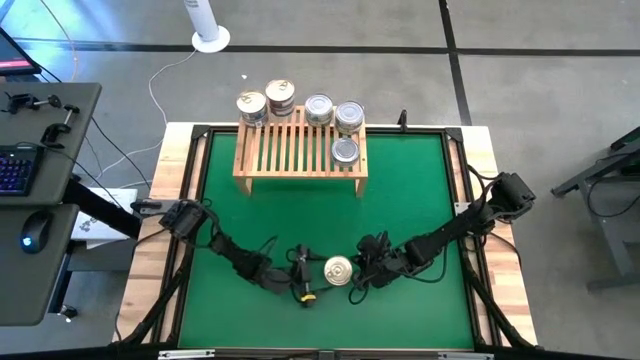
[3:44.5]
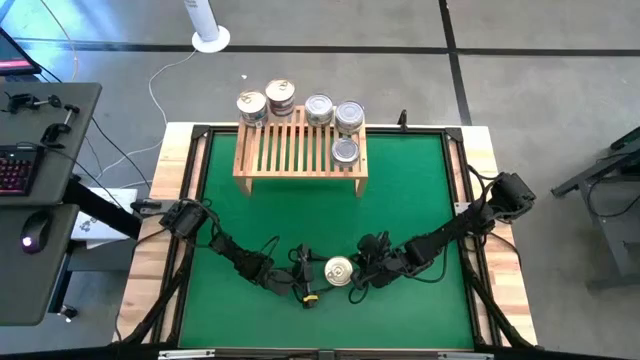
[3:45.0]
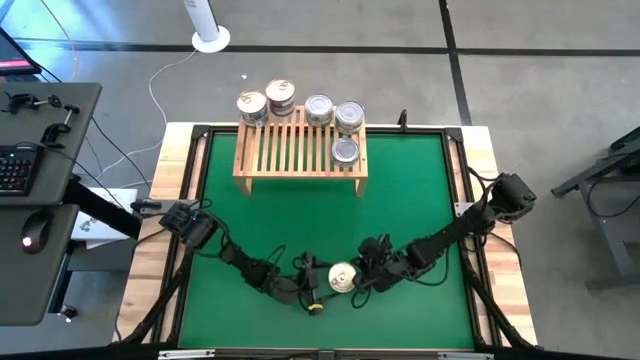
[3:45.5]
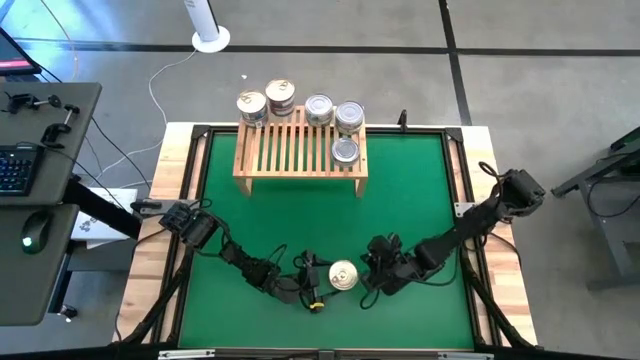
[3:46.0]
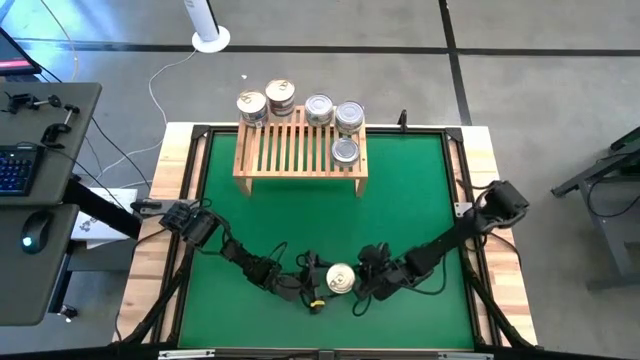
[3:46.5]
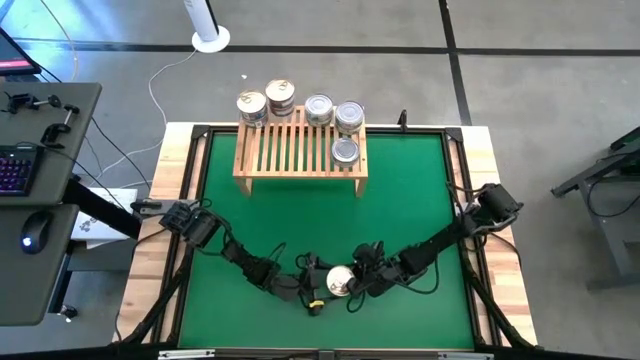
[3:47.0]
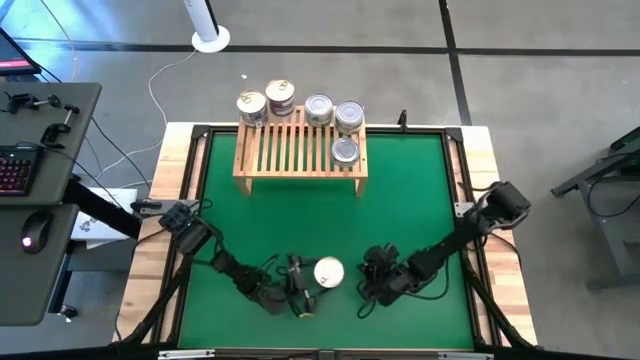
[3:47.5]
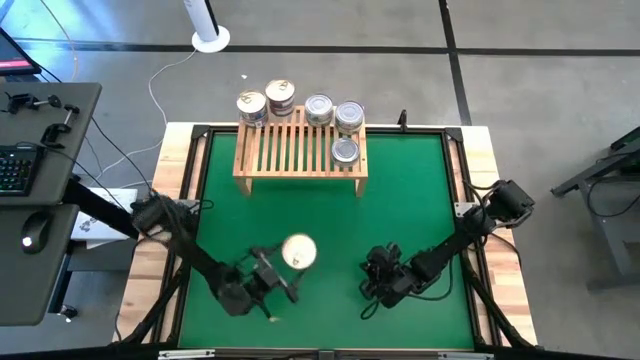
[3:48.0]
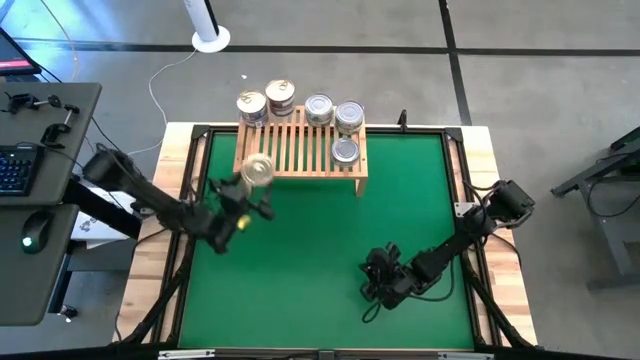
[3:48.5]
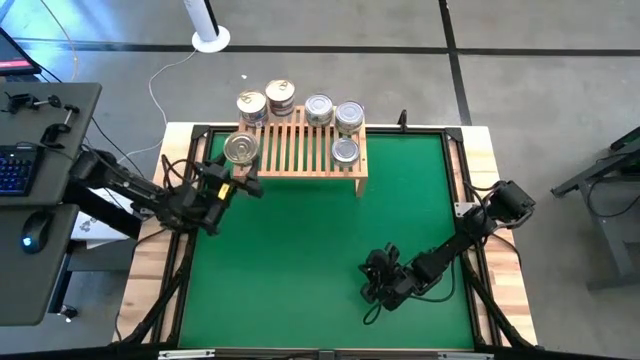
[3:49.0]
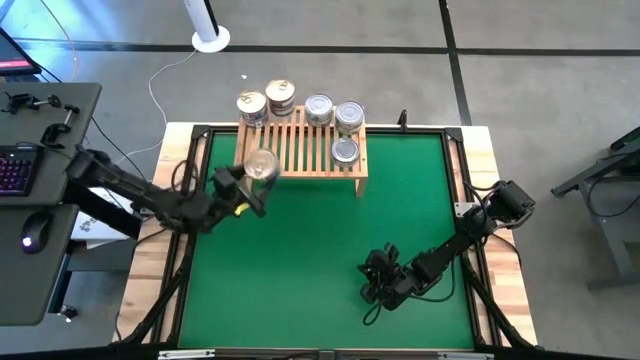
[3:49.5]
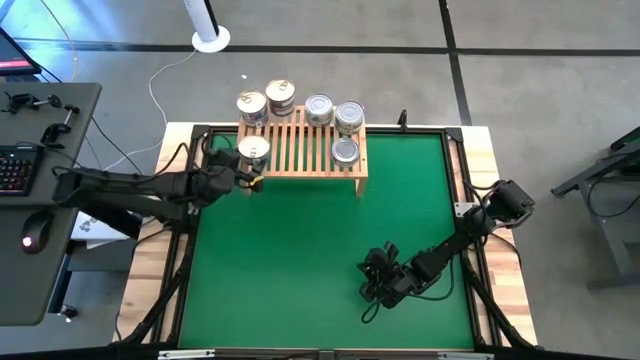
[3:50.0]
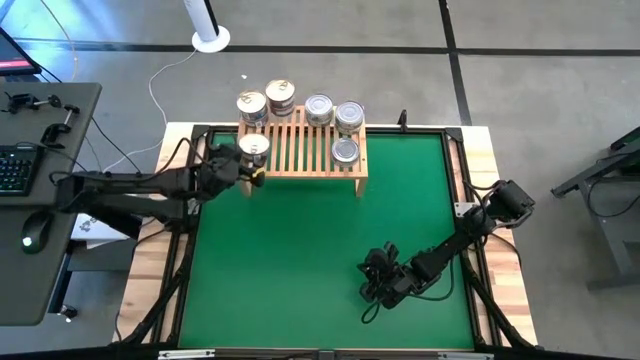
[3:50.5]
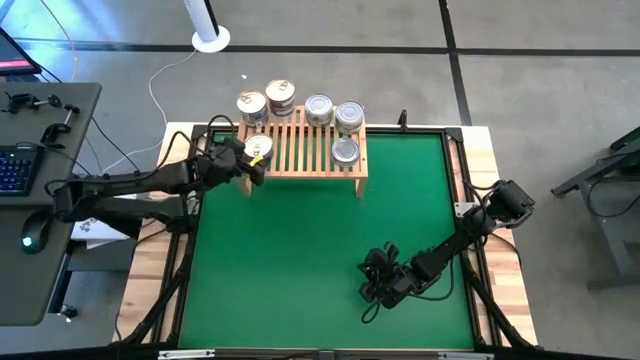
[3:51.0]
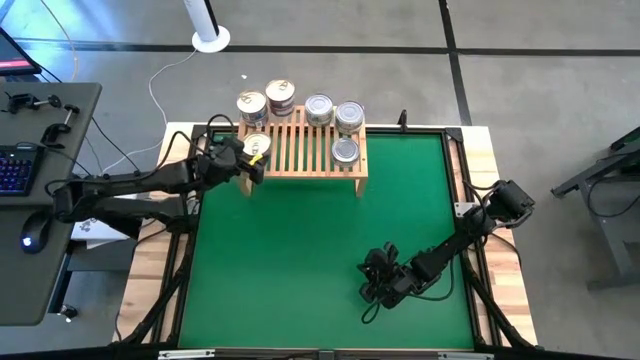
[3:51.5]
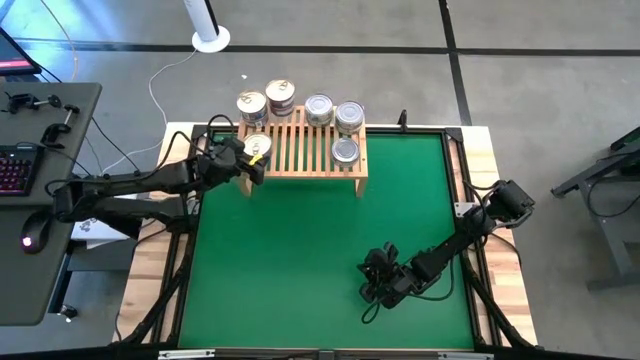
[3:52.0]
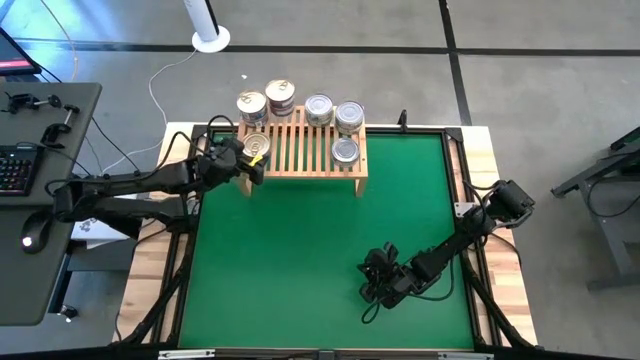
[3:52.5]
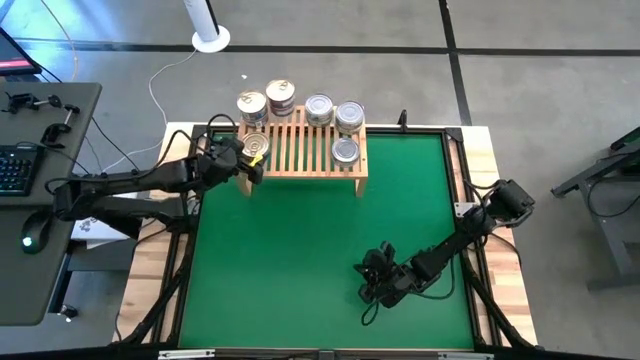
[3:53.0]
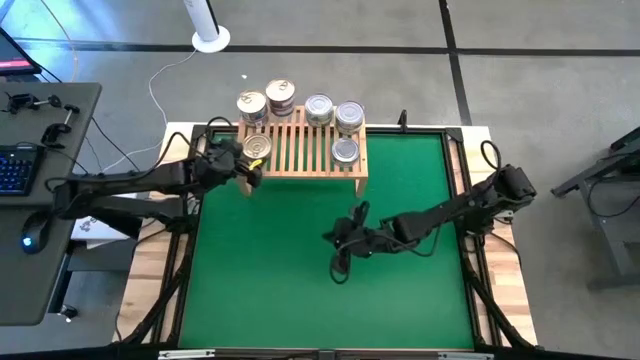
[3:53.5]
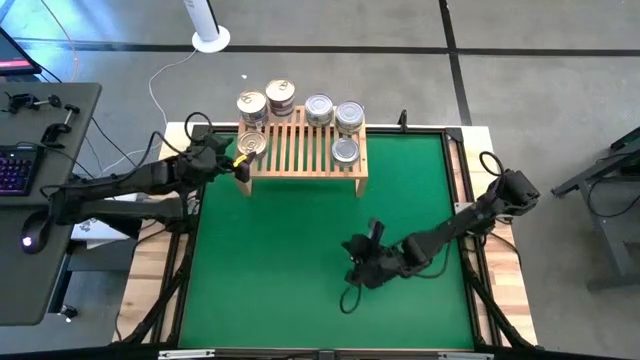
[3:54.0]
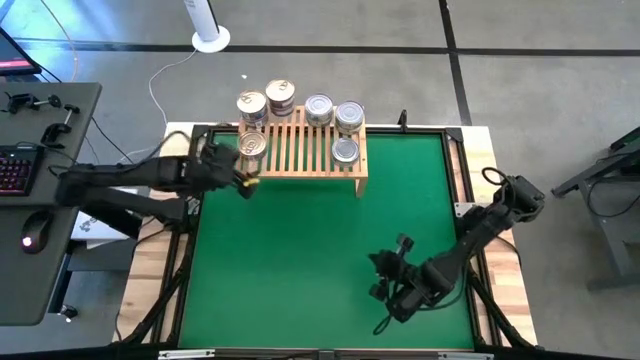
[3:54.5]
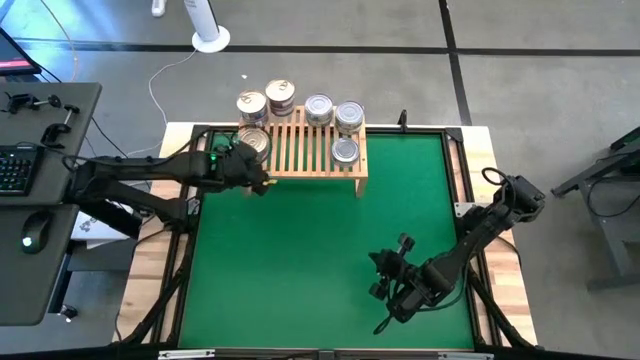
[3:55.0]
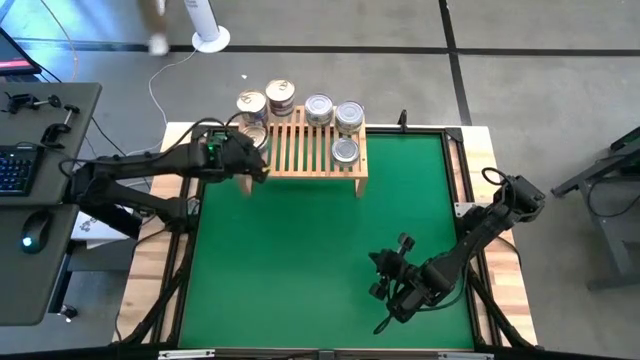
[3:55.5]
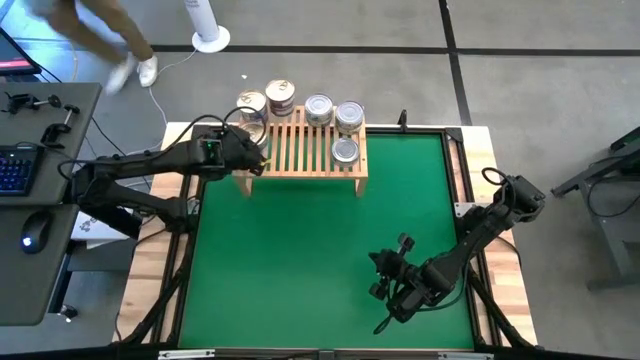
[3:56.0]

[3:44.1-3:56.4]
Task: Stack canned seafood by type on shelf
Put the blue pink tuna can on the shelf

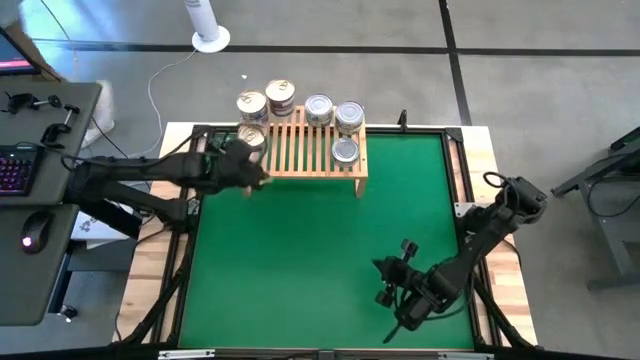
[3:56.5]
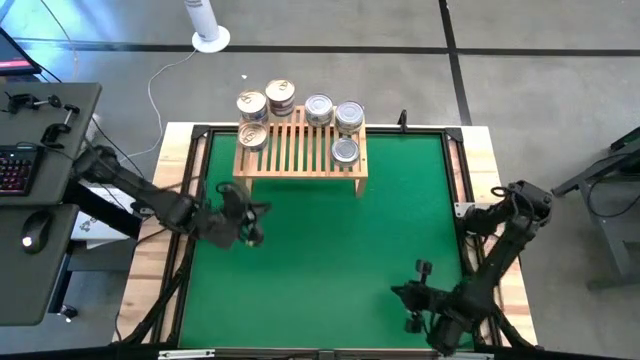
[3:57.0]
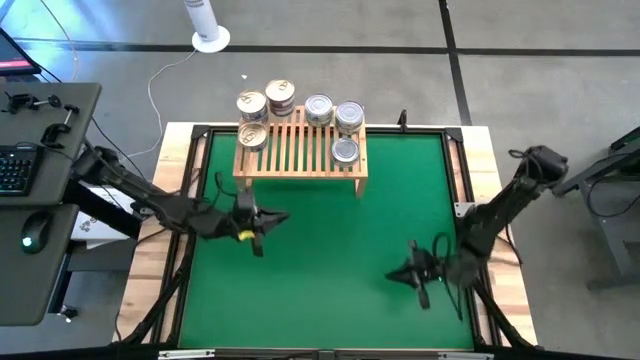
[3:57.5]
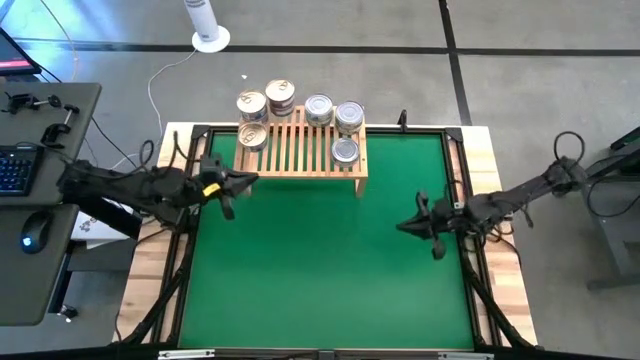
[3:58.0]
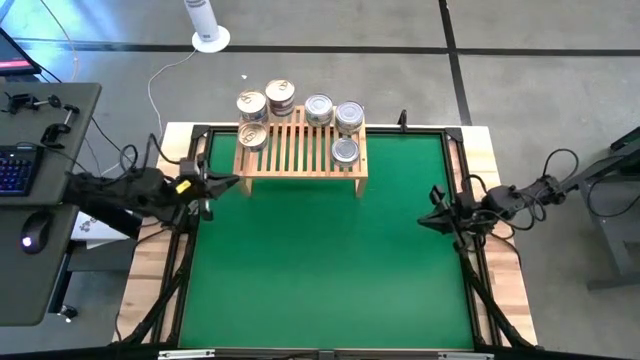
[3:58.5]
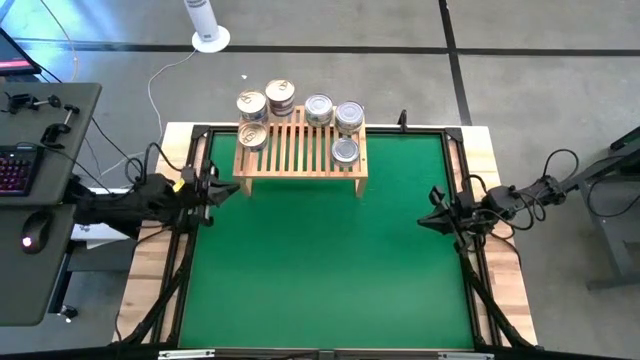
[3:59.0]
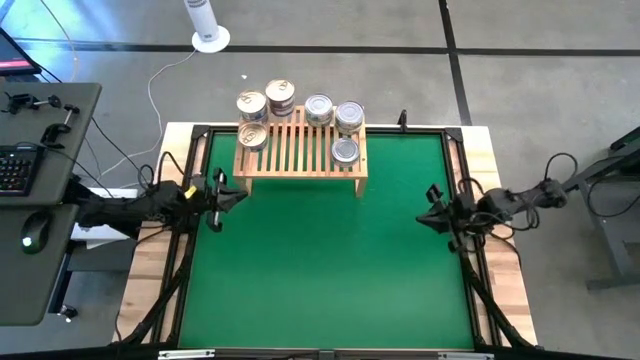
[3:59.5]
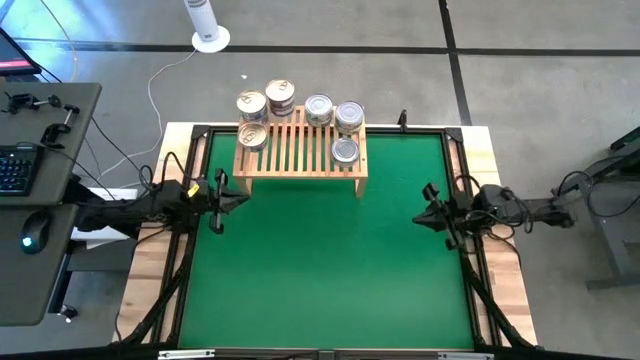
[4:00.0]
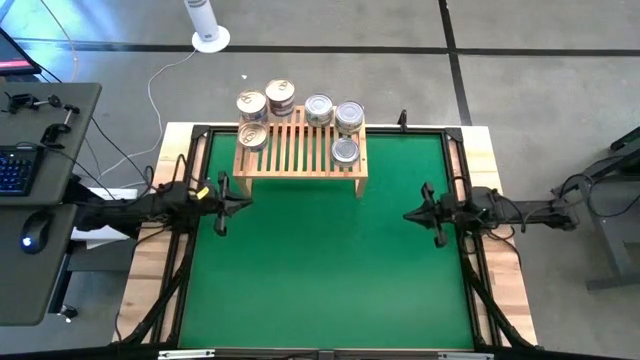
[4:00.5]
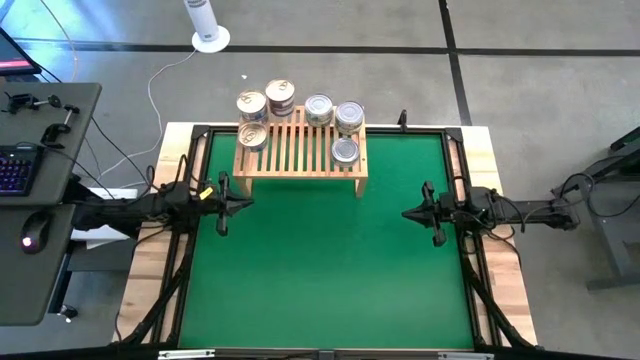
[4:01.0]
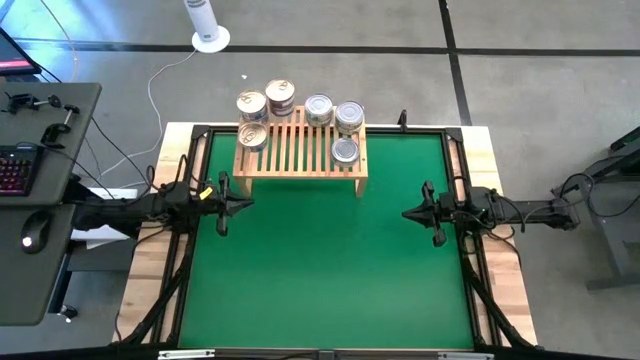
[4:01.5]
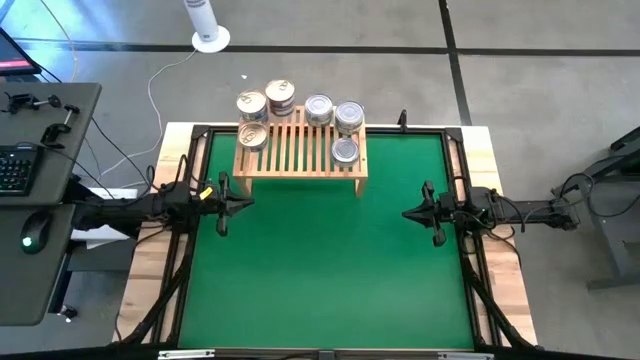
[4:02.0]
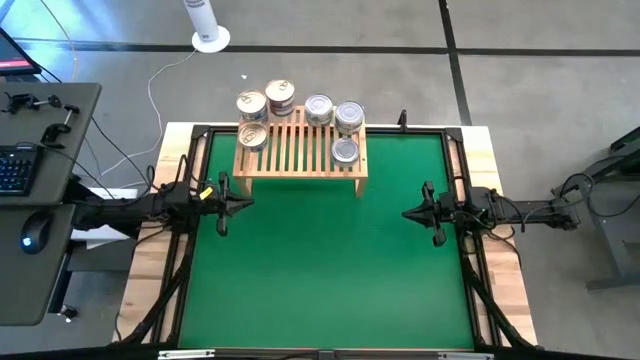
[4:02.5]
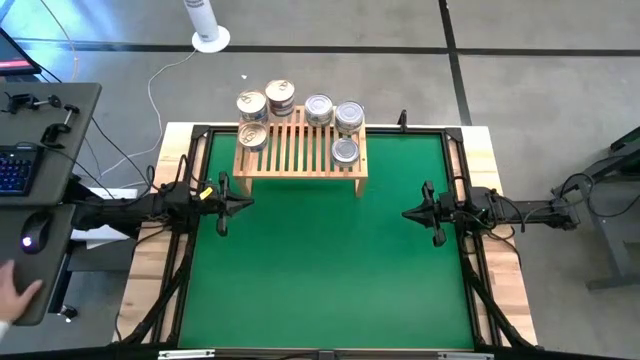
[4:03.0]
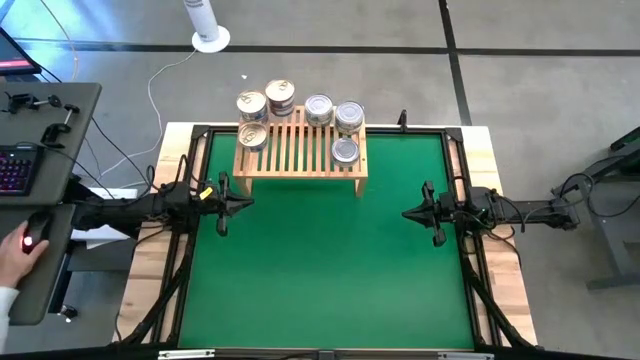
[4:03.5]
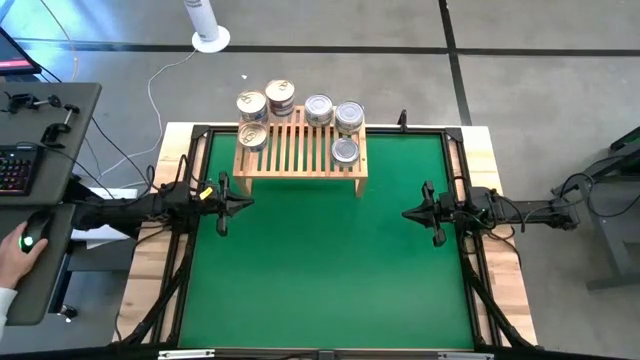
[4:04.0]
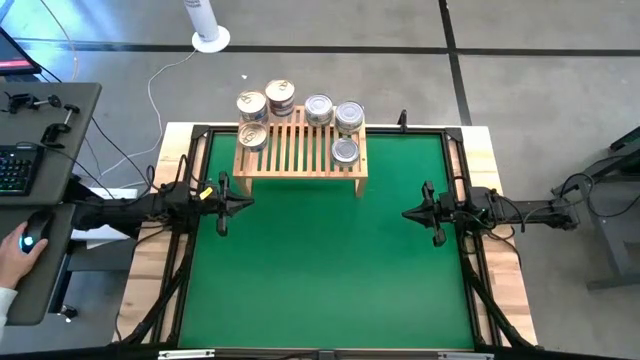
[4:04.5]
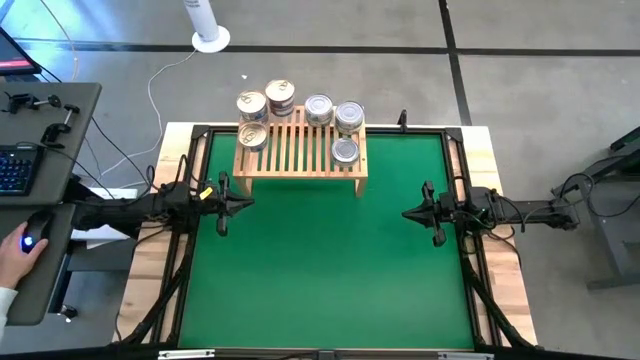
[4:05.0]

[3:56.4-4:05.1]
Return to Home Position
